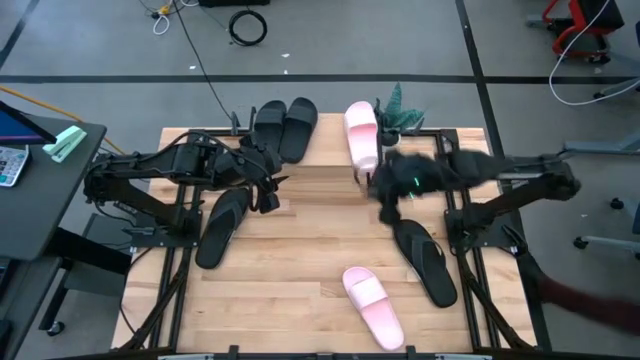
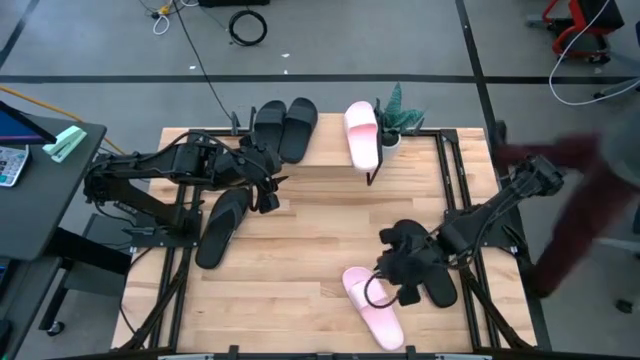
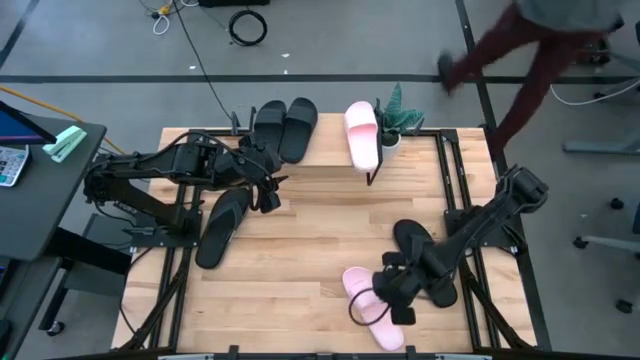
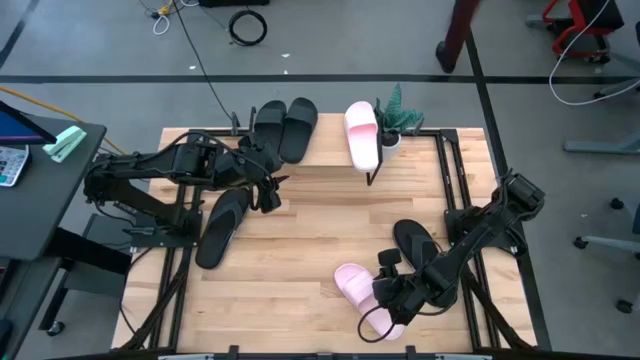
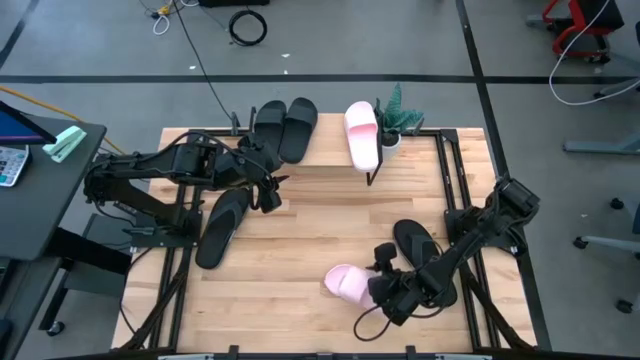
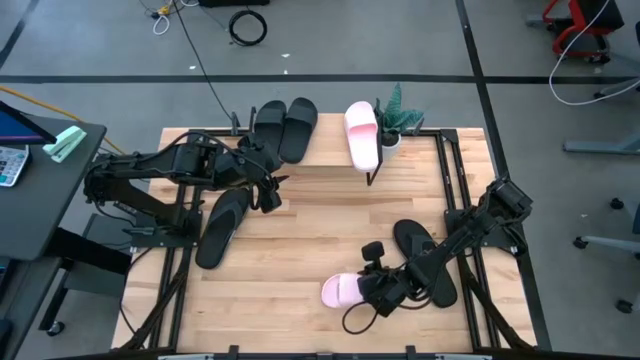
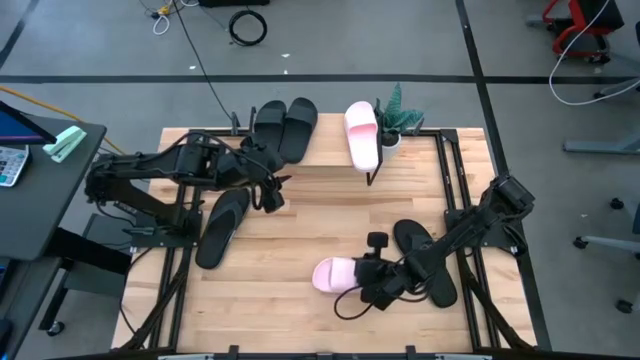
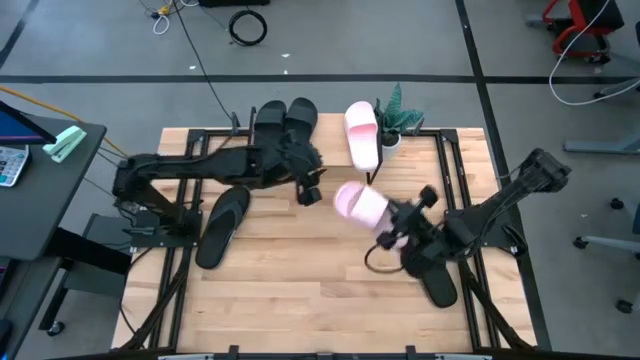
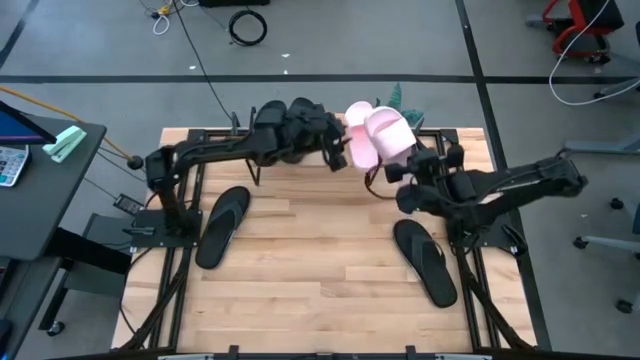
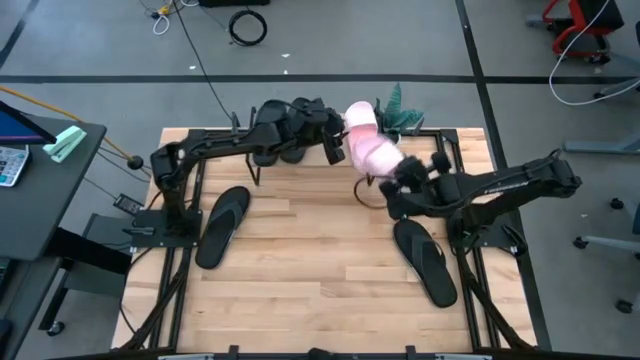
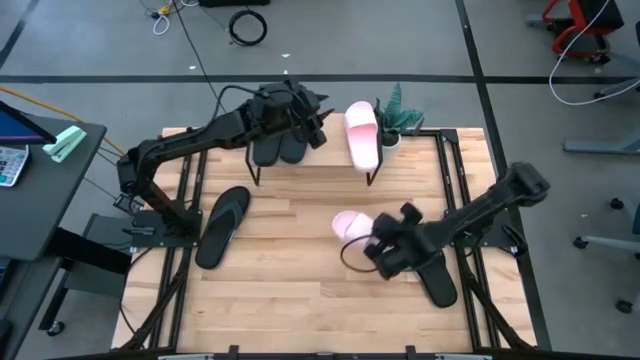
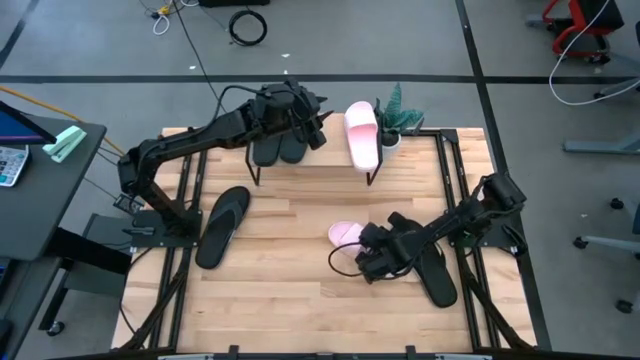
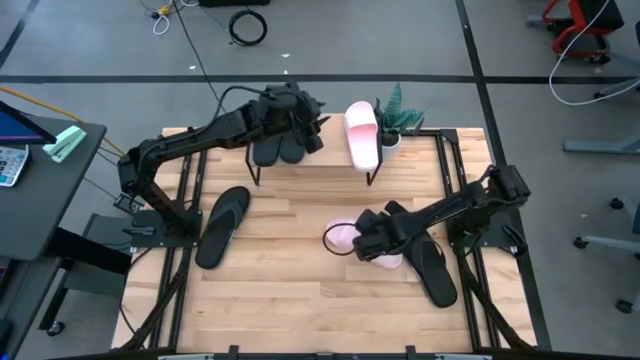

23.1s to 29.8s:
Task: Pick and place slides into the shelf
Move the pink slides to the center of the table

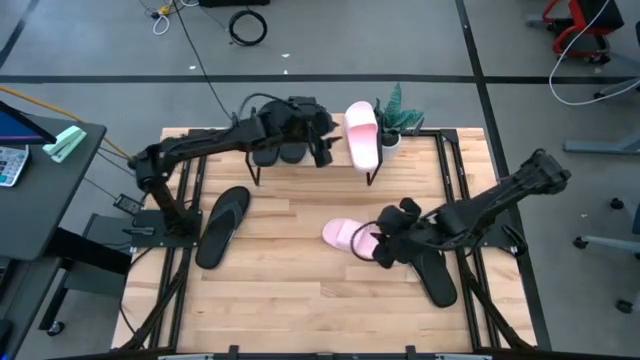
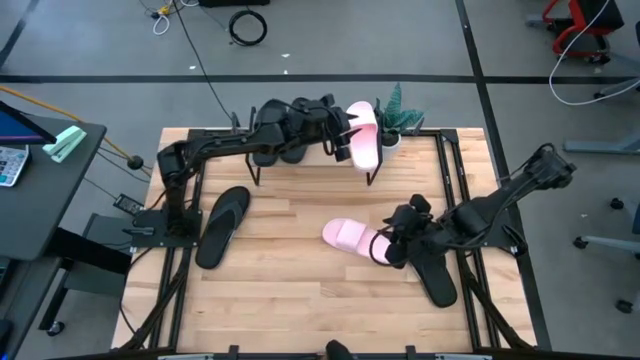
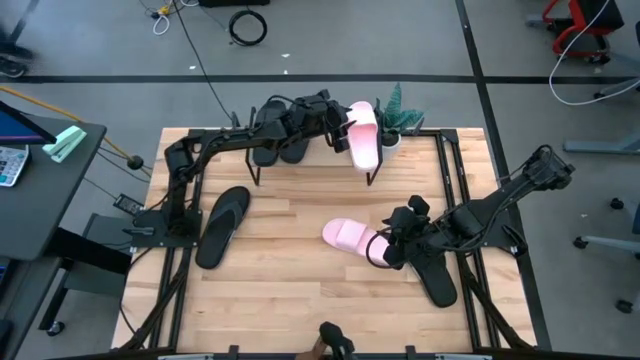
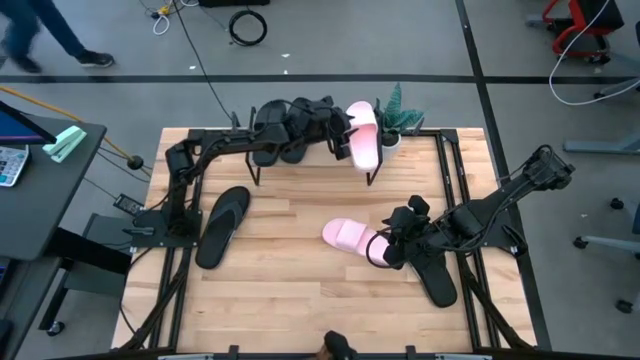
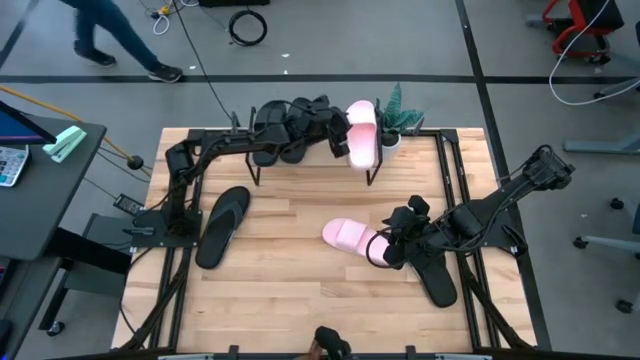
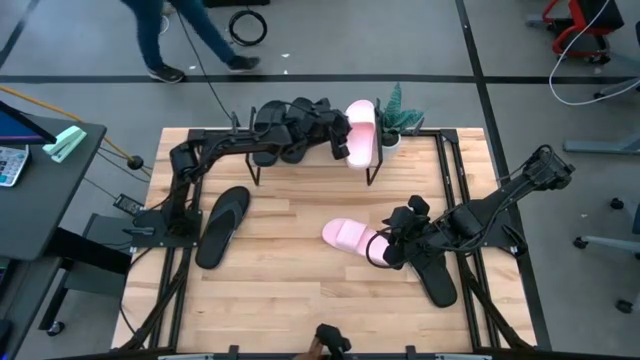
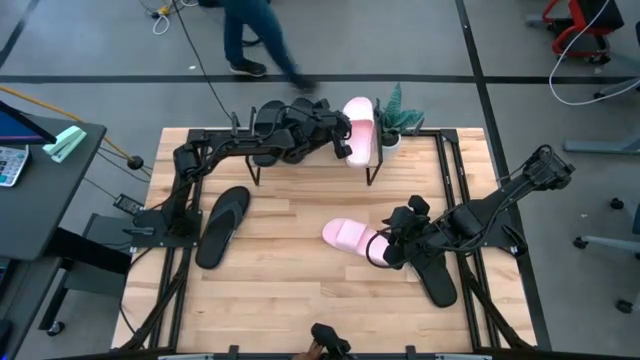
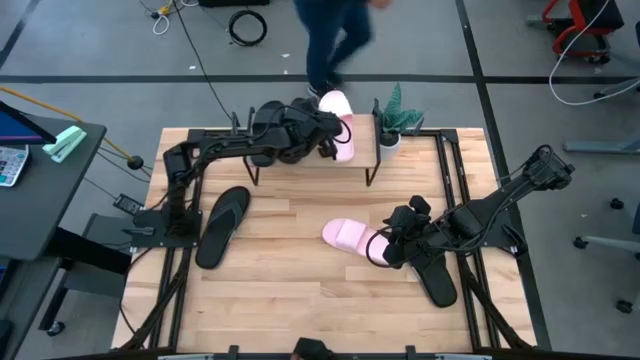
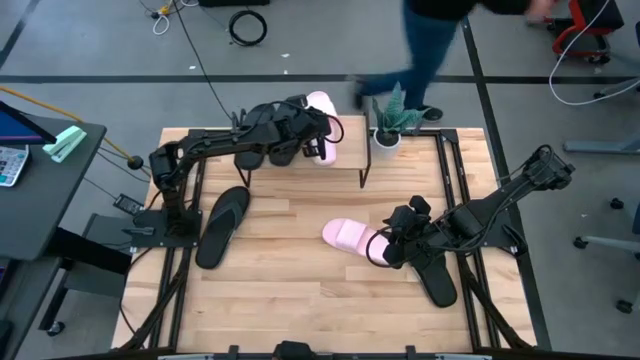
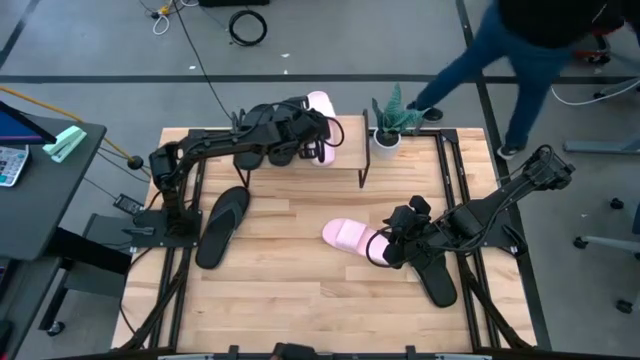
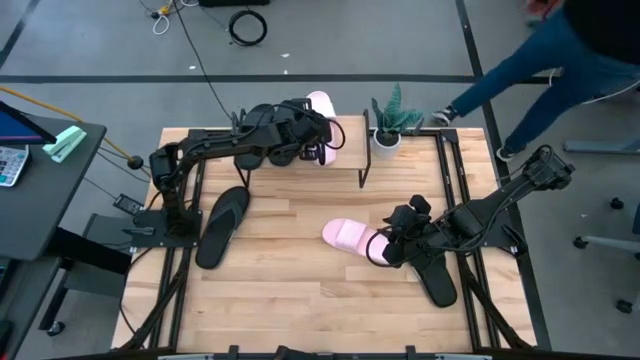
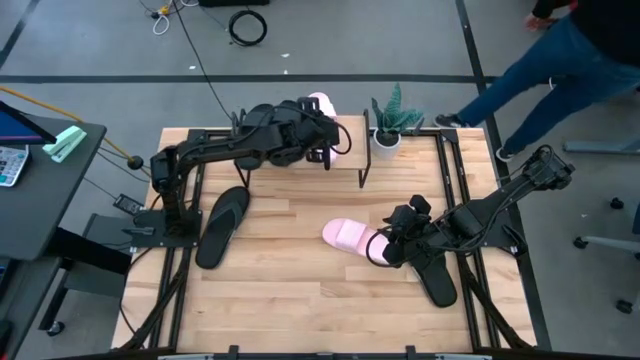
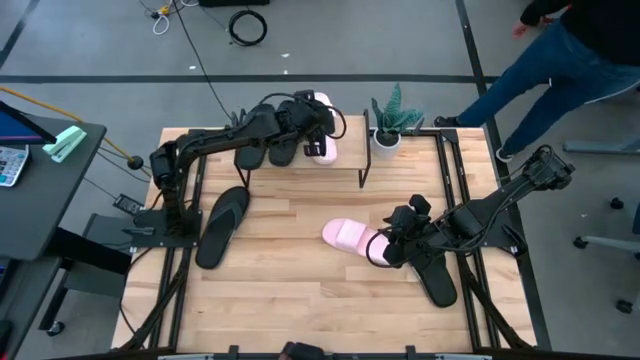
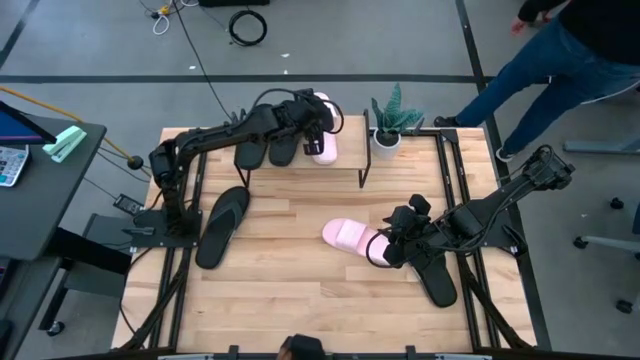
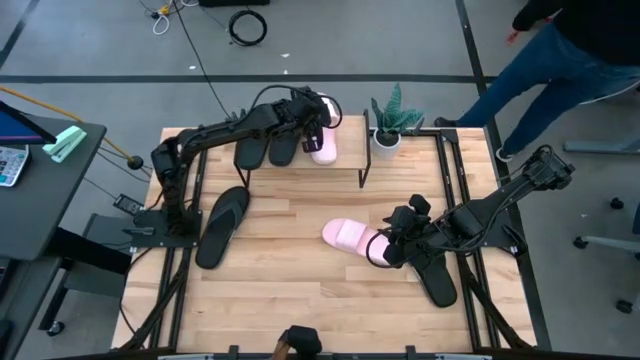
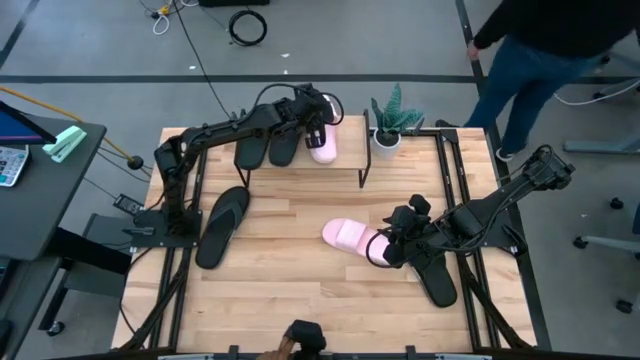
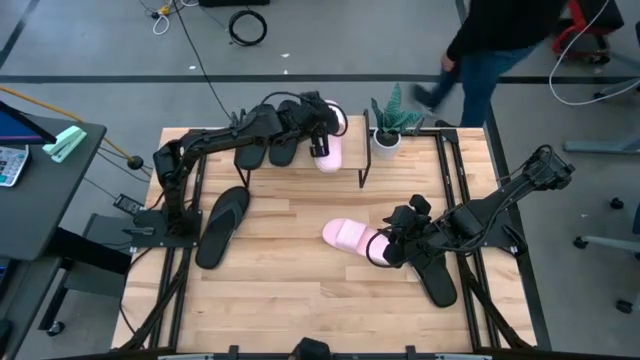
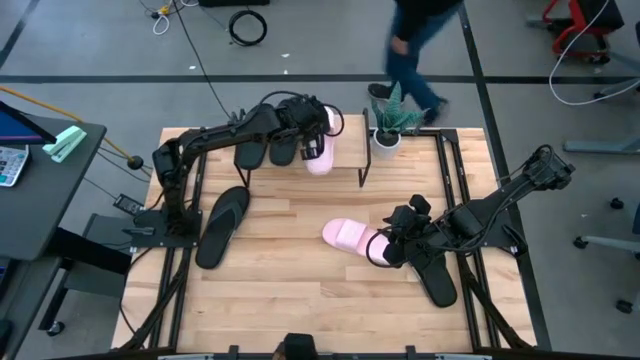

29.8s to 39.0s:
Adjust the pink slides on the shelf

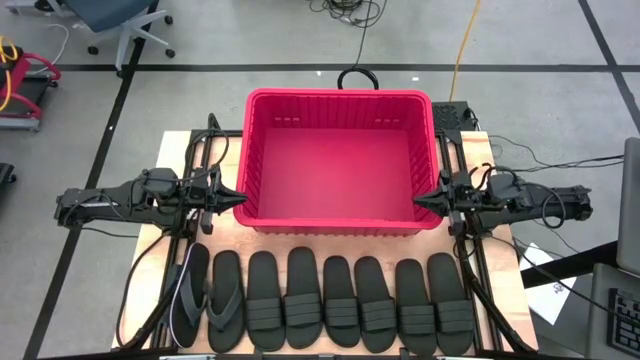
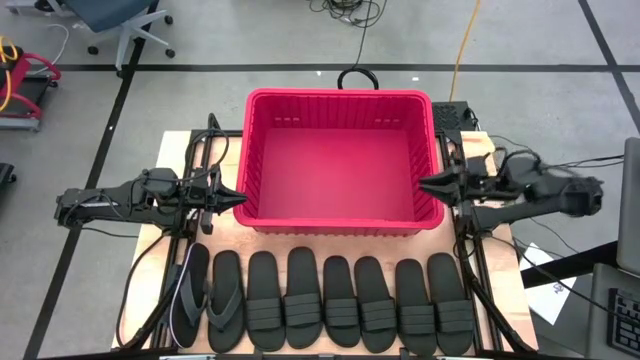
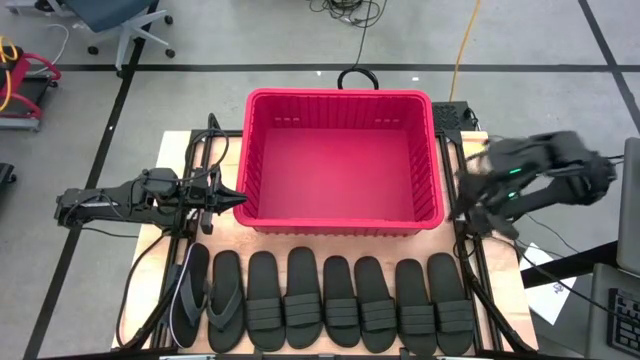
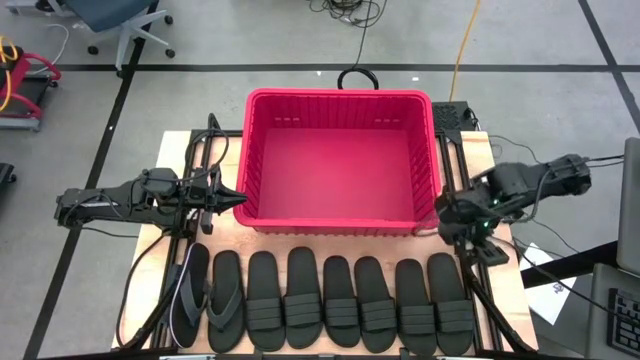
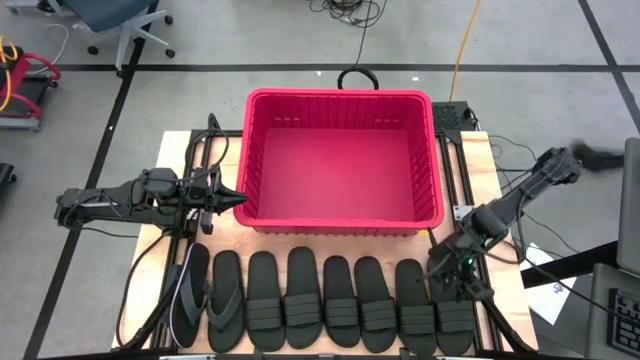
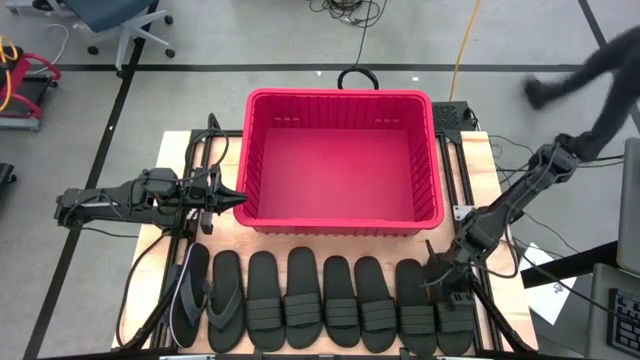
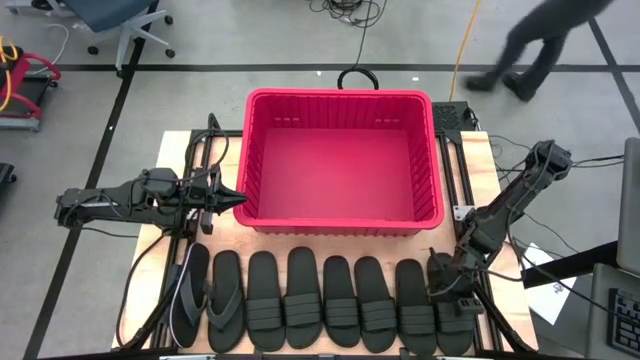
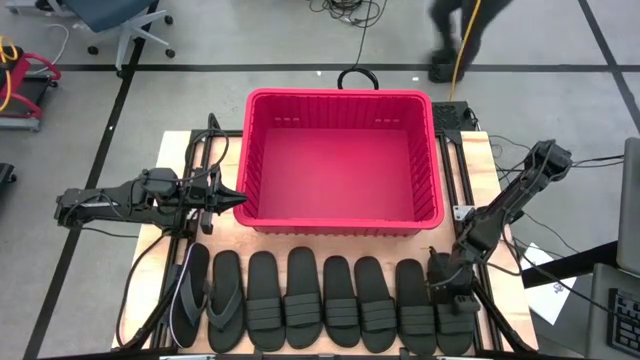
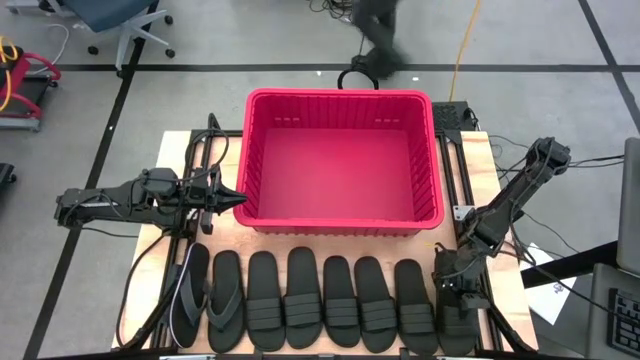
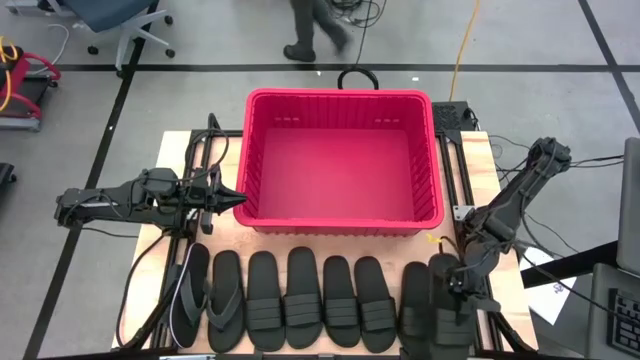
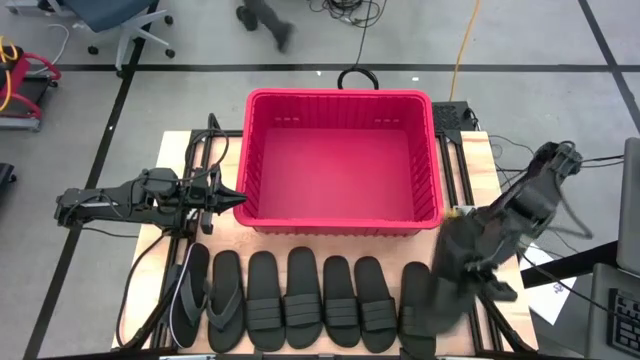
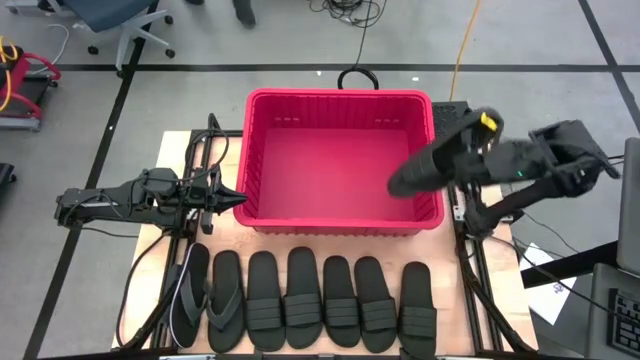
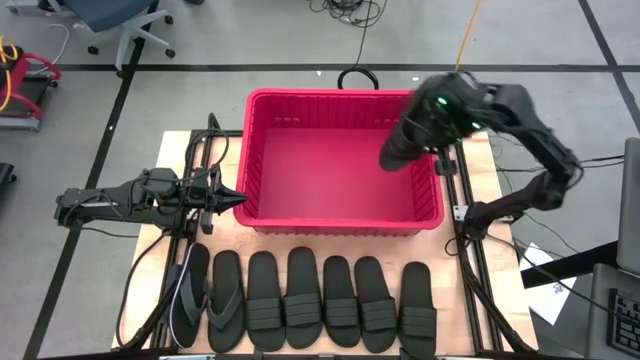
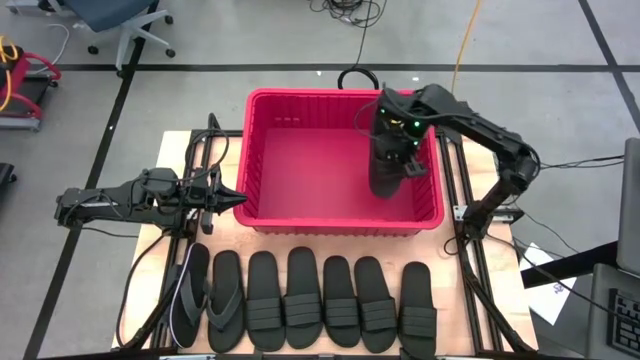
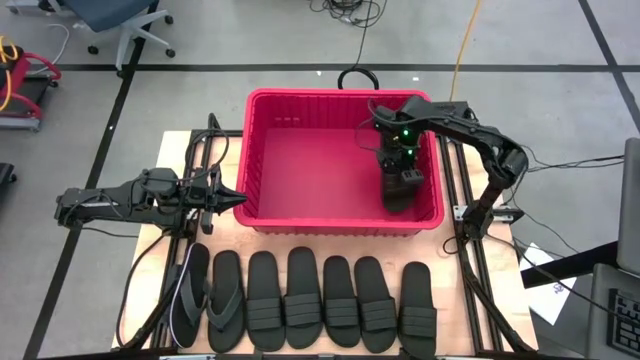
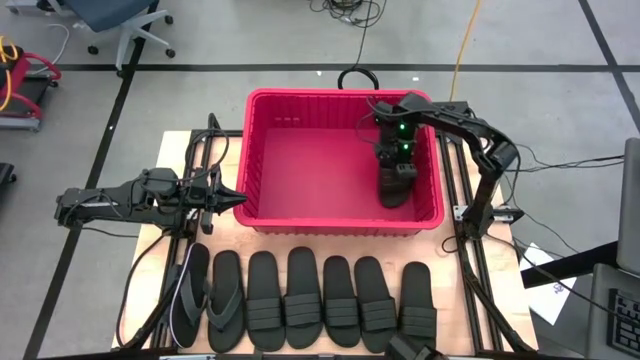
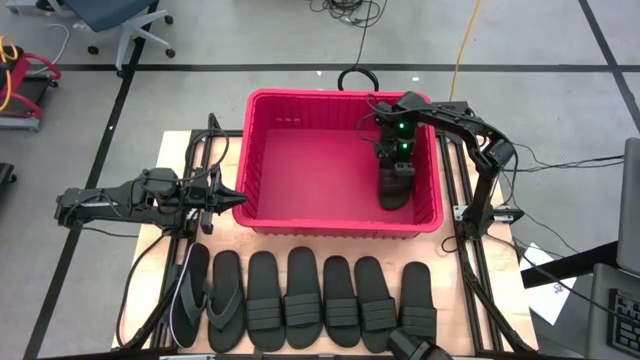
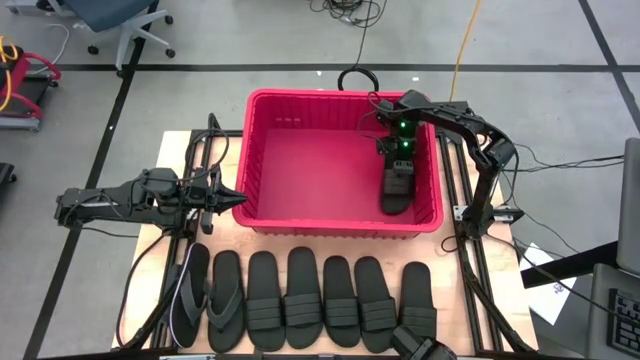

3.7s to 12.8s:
Task: Pick and place slides into bin
Put the black slide into the red bin
